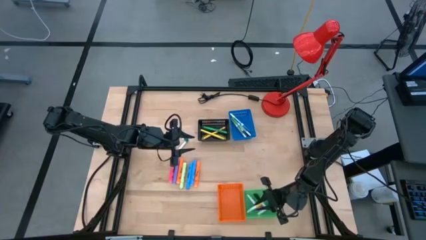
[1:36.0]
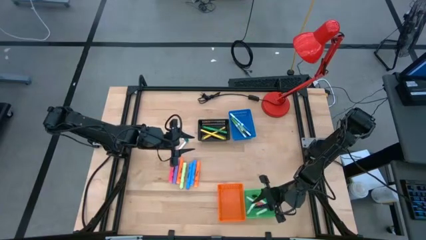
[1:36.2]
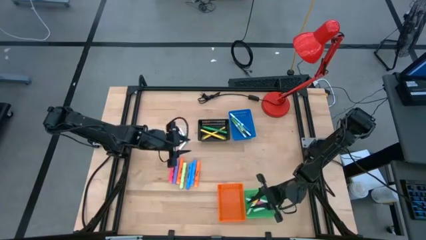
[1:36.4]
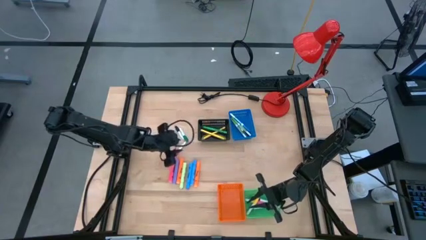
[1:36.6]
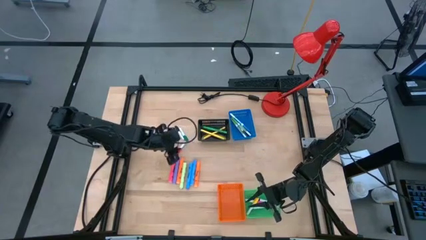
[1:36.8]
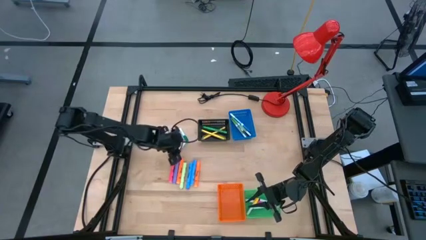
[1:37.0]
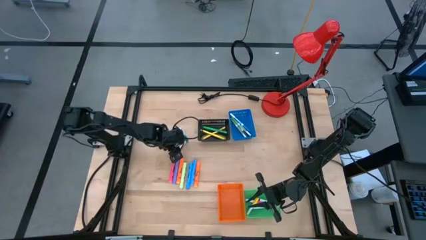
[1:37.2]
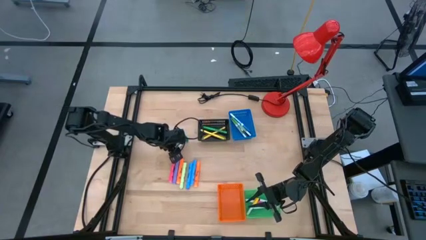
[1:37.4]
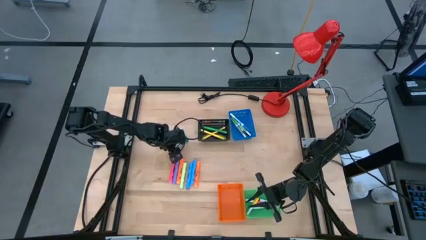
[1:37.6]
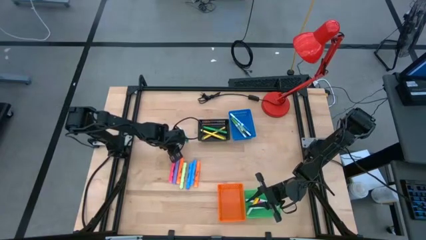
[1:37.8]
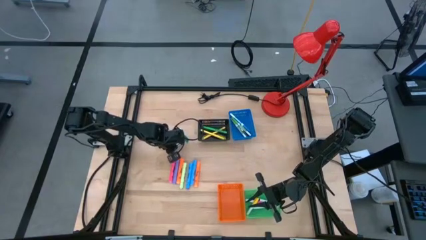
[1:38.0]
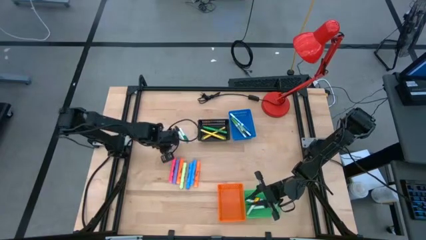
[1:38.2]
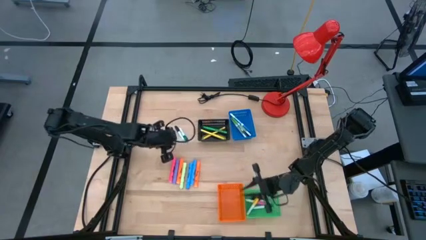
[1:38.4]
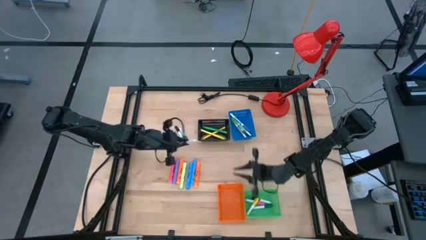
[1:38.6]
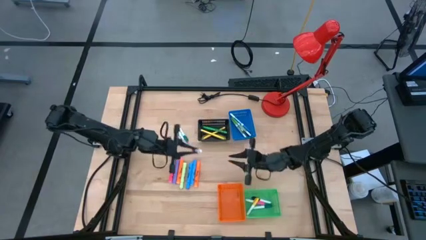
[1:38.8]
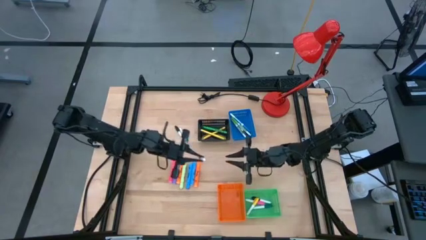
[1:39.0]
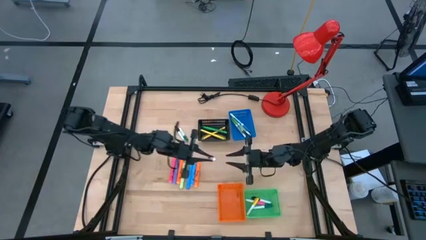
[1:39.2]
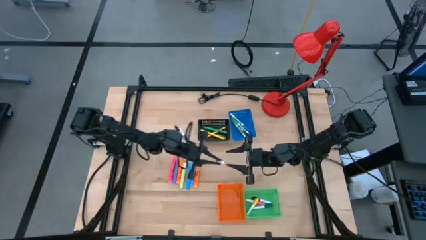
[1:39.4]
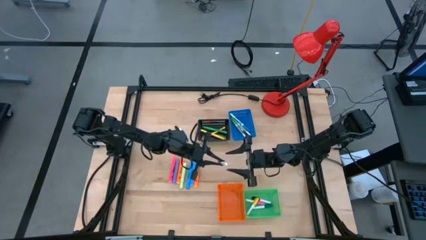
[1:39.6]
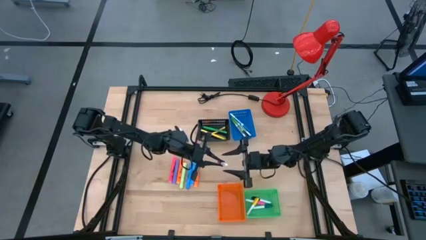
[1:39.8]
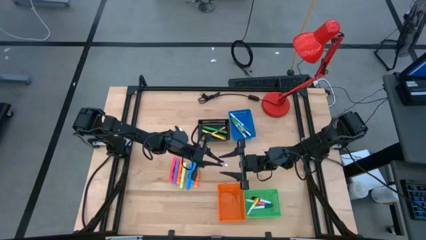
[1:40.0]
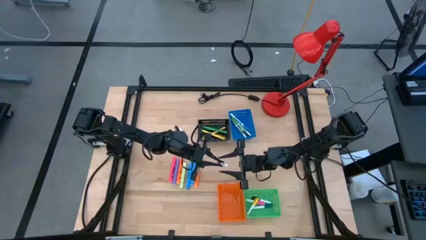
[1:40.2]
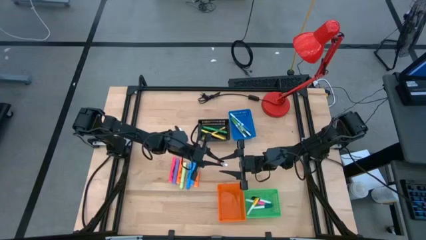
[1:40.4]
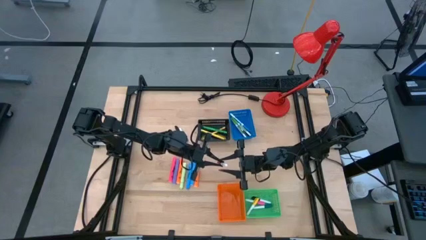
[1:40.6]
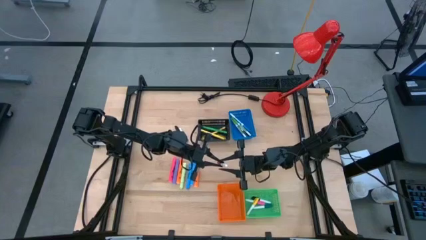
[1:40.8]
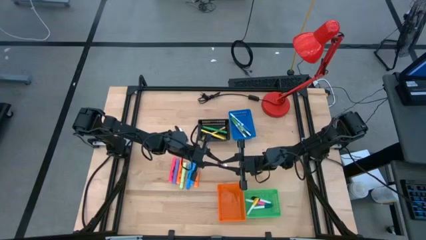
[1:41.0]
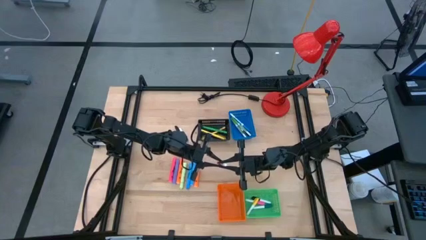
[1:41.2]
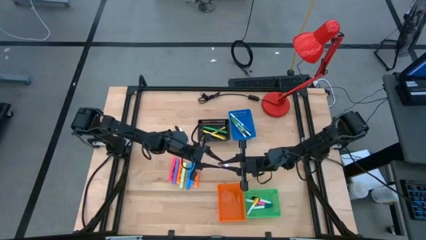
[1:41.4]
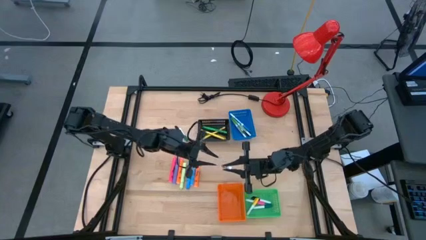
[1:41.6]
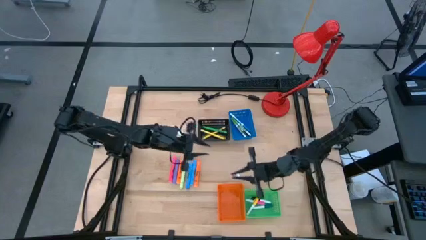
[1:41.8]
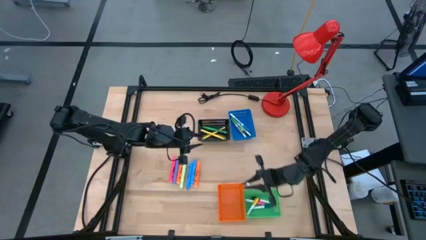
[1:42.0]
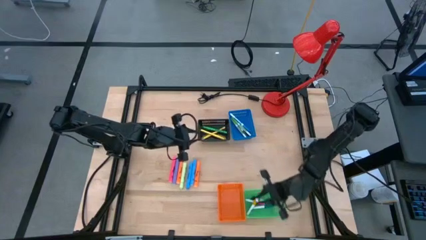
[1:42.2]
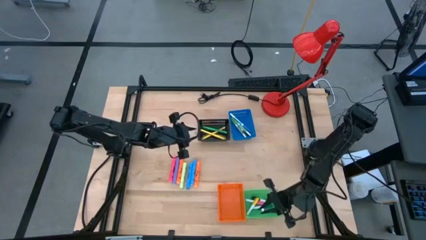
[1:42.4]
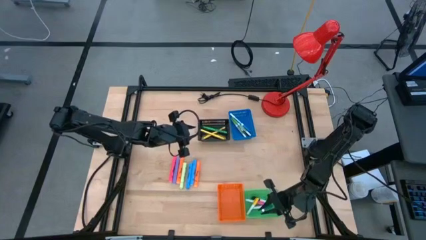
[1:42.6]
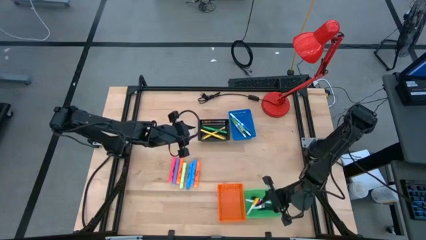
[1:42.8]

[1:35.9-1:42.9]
Task: Pick & Place Markers
Put the red highlighter pen into the green bin

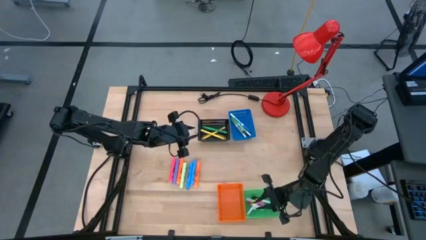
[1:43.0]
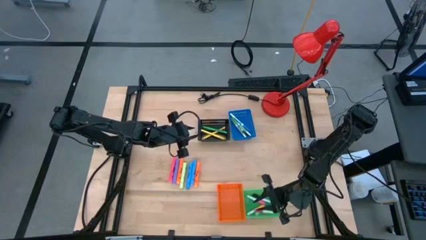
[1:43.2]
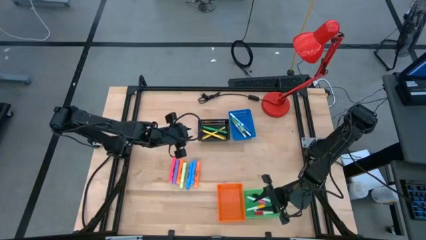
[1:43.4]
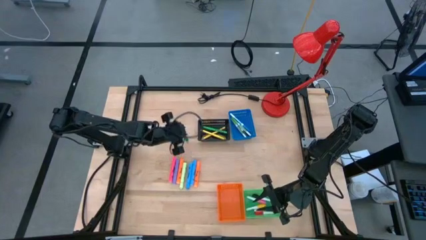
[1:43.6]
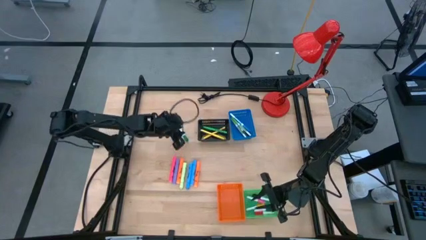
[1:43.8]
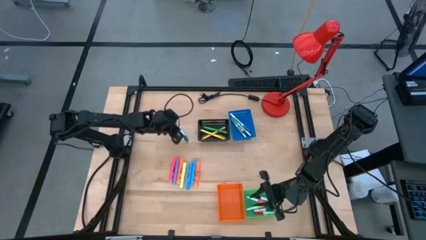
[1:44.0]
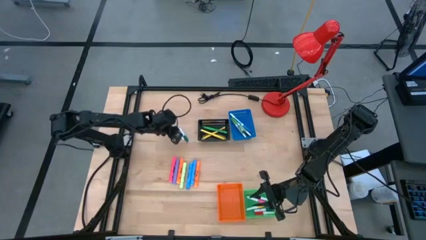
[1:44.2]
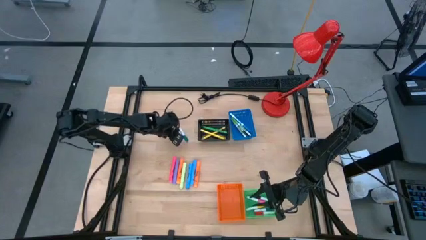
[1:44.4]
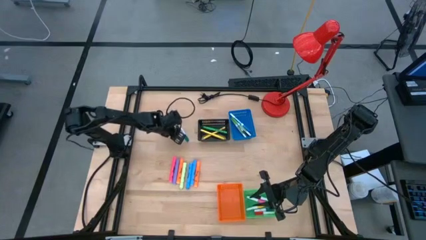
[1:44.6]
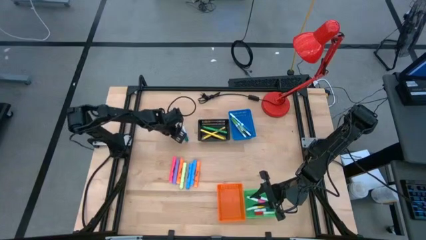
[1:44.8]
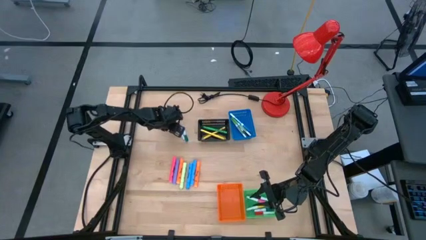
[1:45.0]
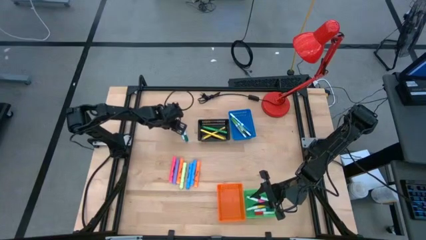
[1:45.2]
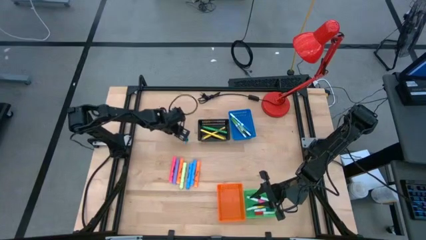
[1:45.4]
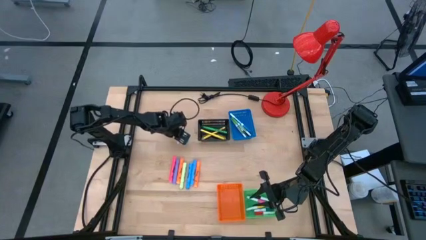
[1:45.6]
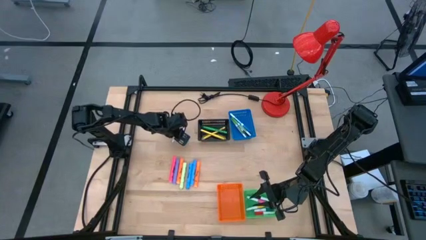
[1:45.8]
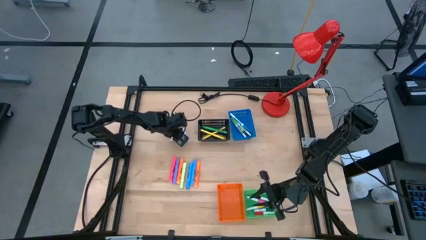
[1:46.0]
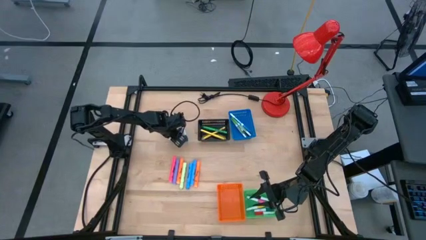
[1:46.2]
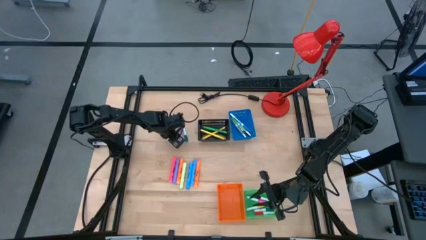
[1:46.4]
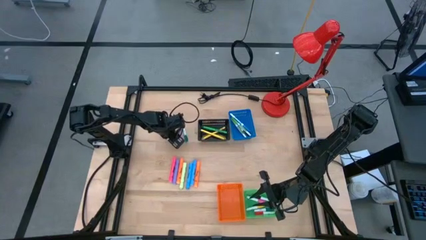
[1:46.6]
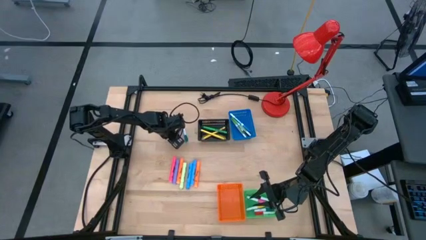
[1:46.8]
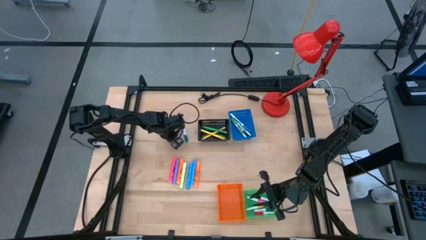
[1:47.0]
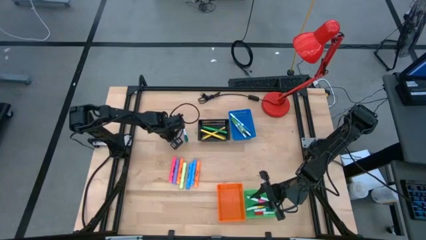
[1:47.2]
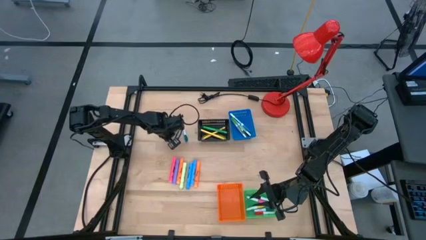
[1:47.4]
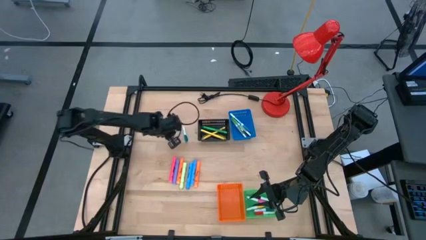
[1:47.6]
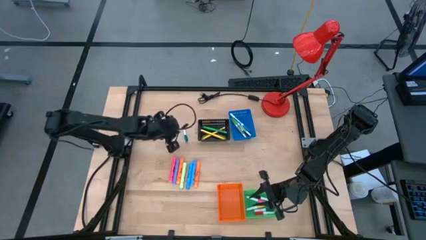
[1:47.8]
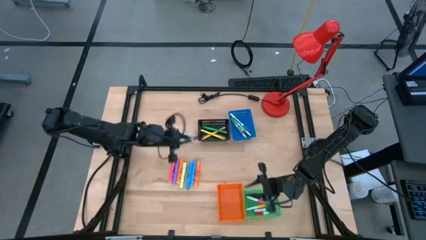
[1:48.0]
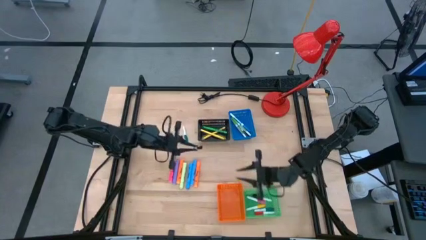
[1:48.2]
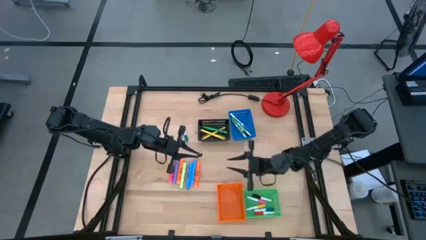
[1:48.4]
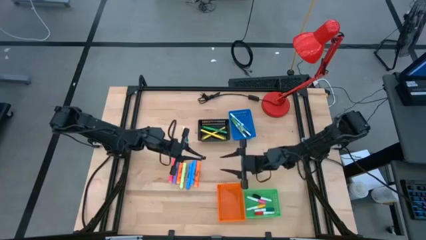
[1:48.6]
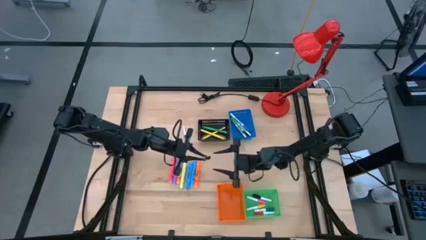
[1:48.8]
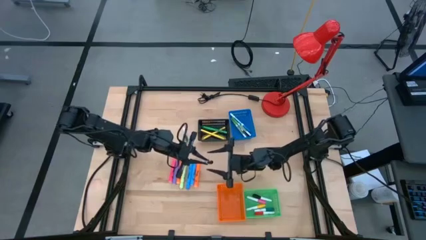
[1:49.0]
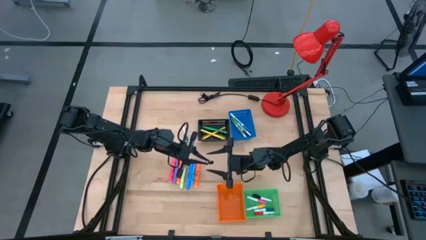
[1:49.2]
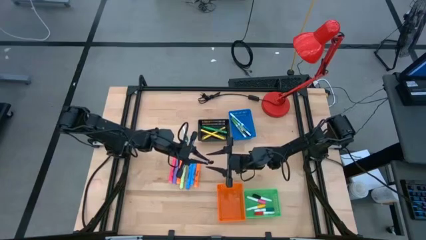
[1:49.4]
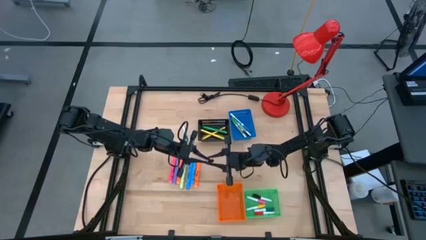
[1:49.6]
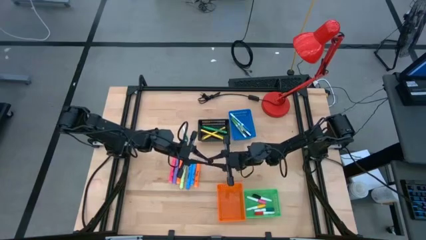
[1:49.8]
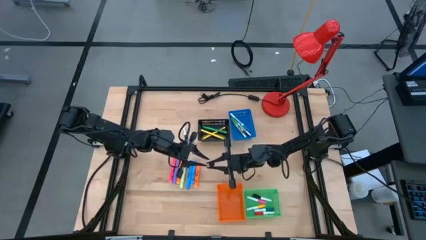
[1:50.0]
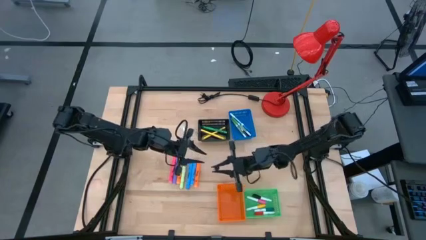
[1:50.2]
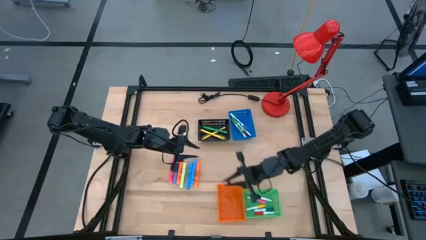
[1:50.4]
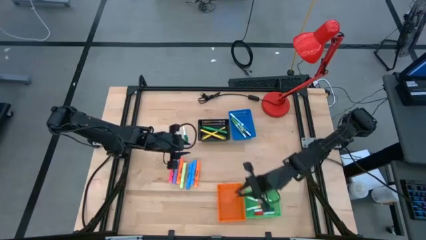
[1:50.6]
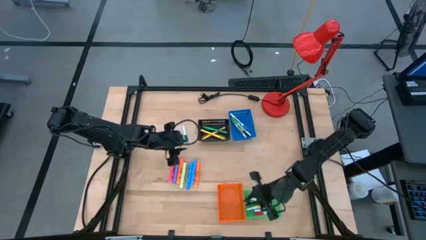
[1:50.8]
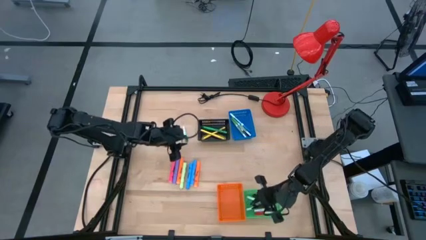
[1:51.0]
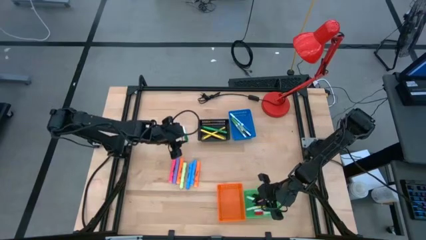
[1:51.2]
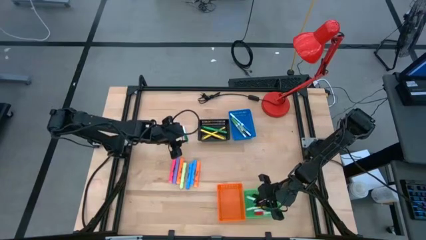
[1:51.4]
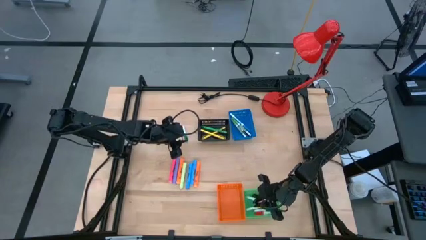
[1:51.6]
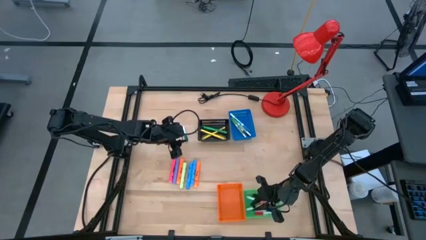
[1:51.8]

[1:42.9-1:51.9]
Put the black highlighter pen into the green bin
